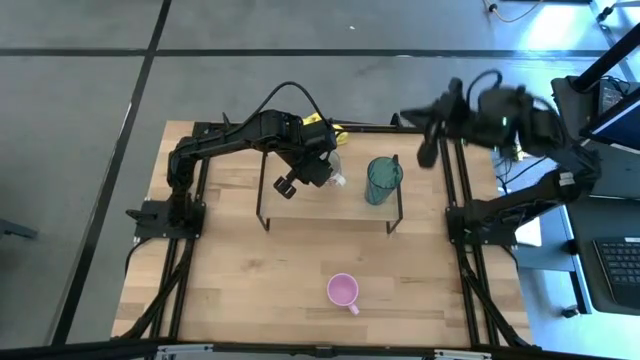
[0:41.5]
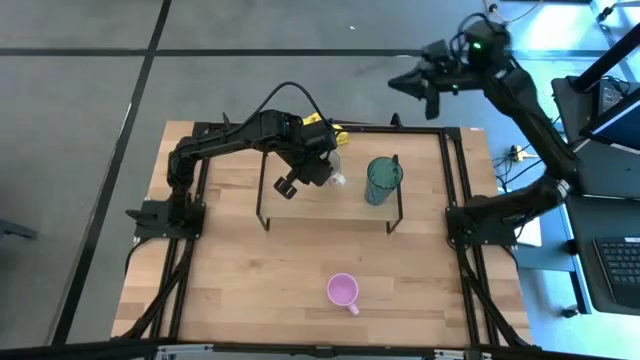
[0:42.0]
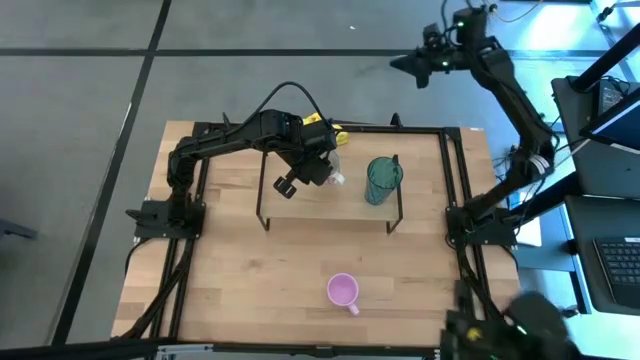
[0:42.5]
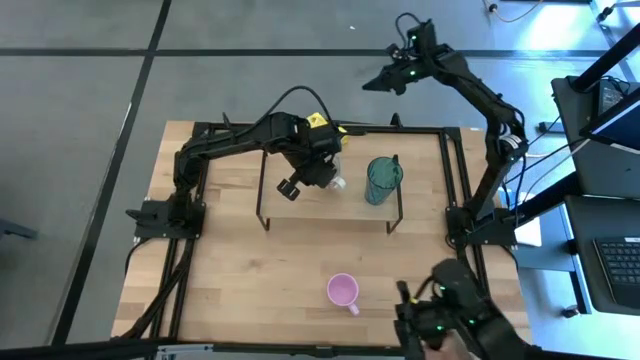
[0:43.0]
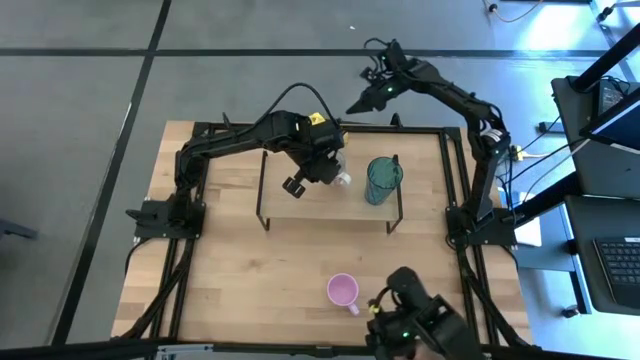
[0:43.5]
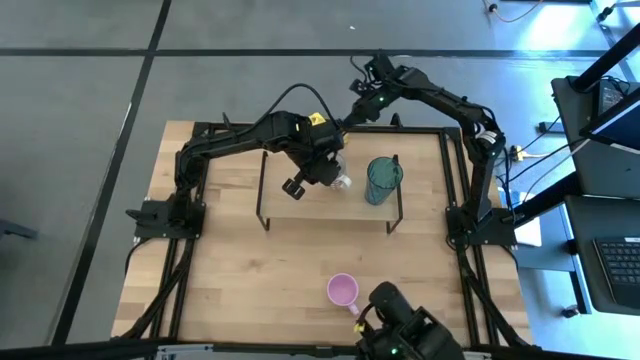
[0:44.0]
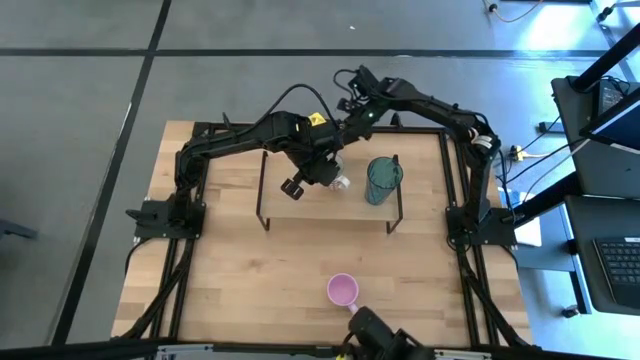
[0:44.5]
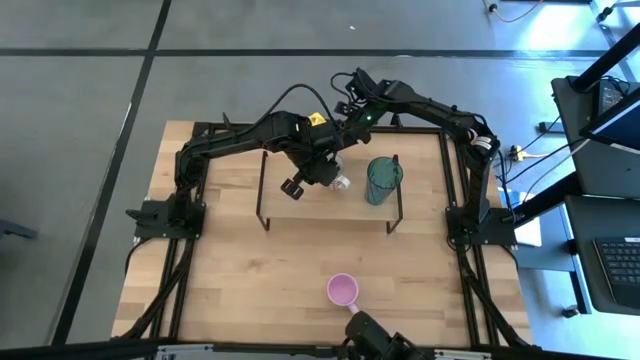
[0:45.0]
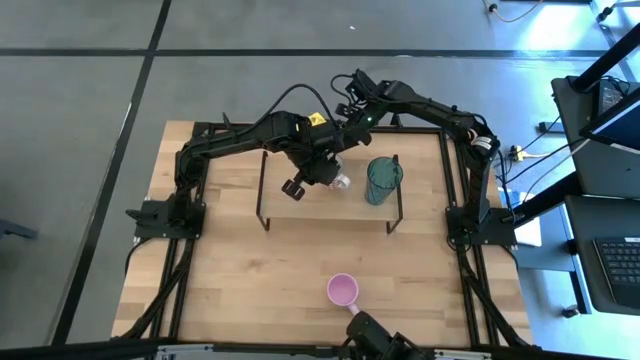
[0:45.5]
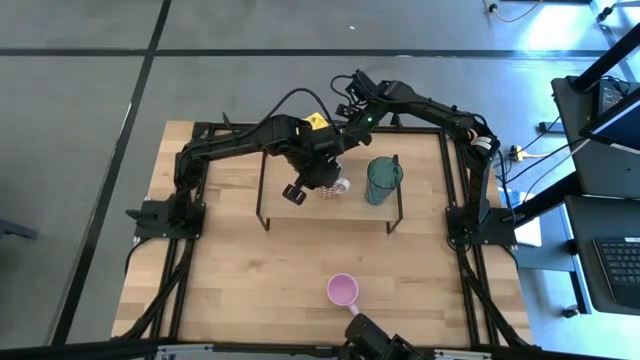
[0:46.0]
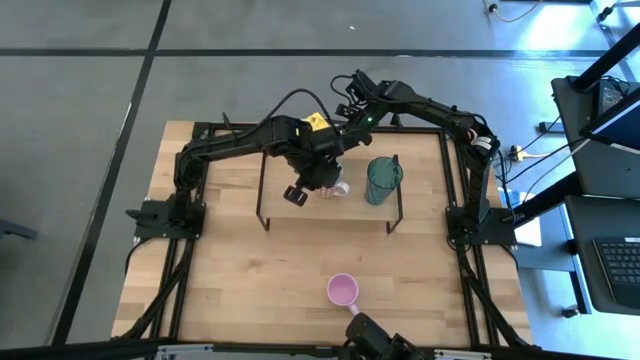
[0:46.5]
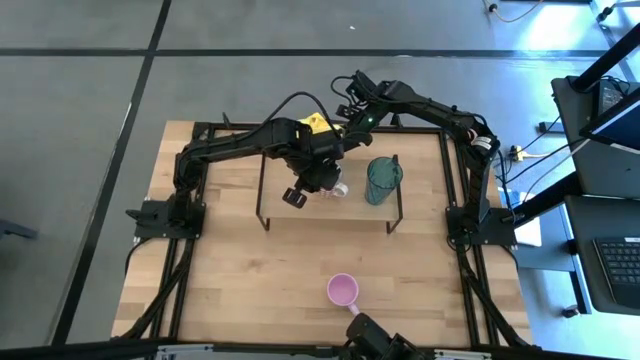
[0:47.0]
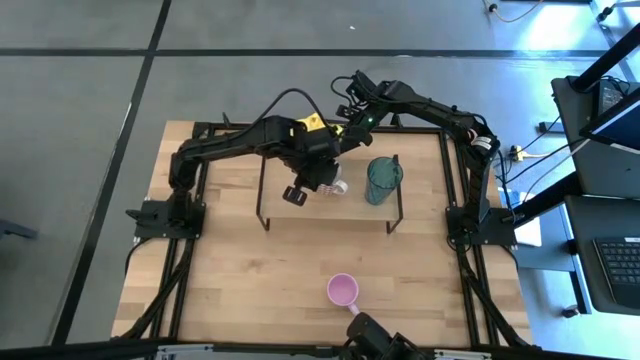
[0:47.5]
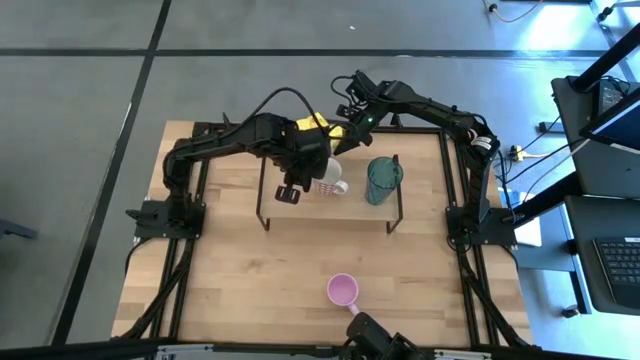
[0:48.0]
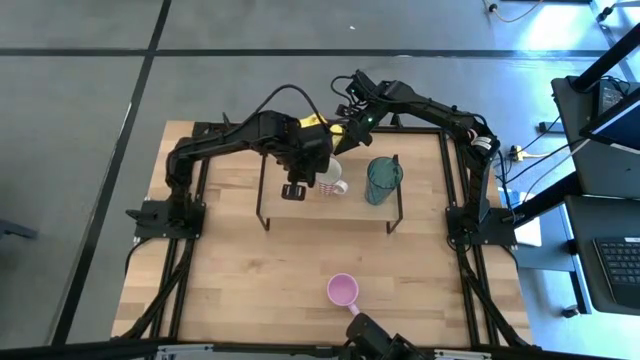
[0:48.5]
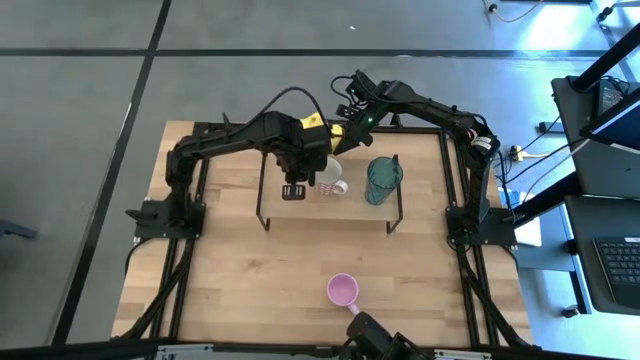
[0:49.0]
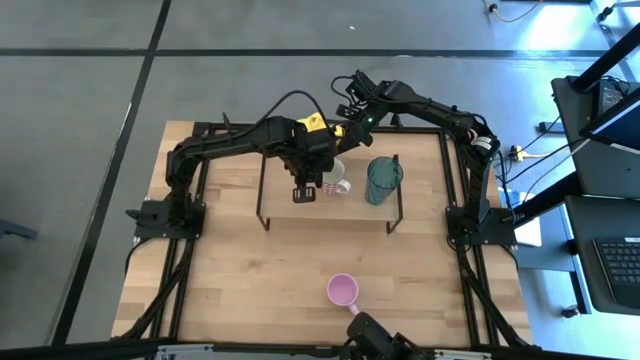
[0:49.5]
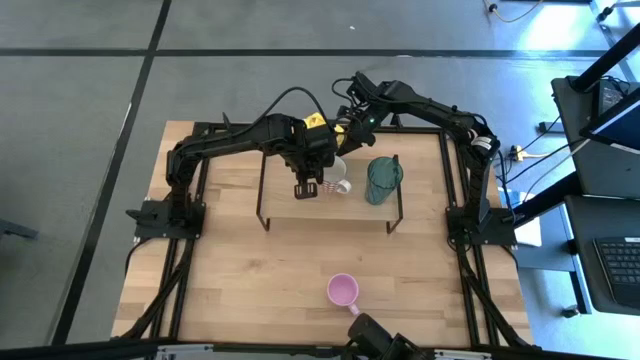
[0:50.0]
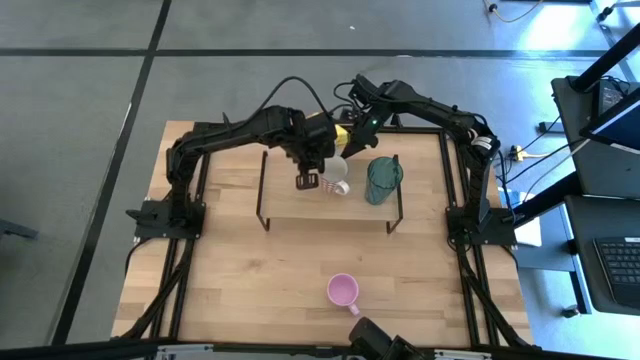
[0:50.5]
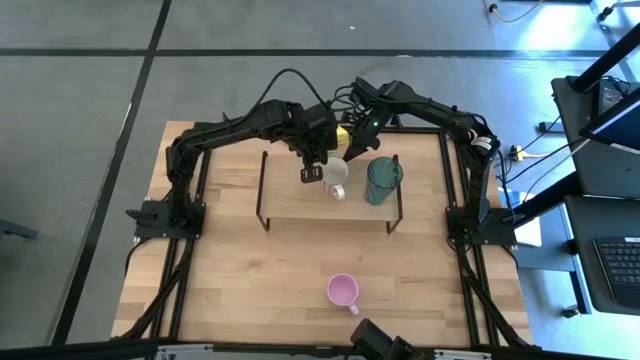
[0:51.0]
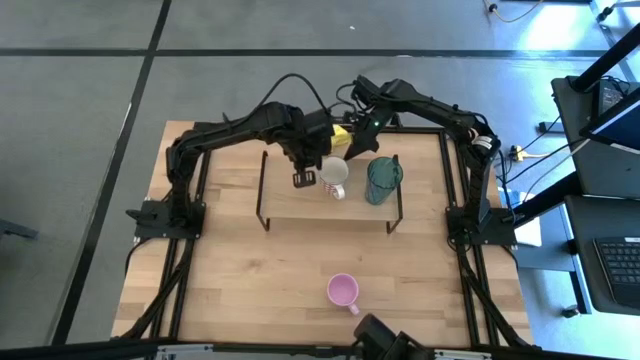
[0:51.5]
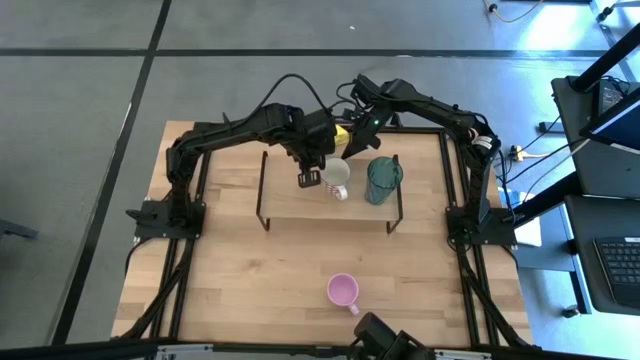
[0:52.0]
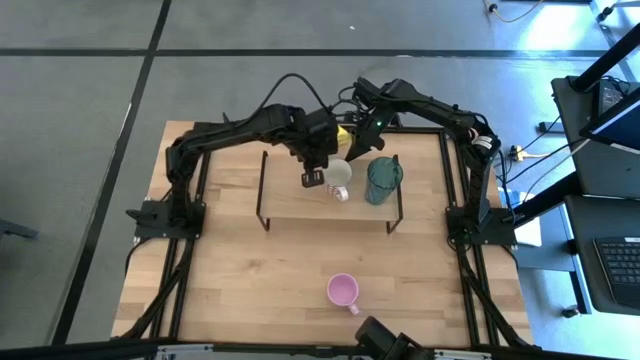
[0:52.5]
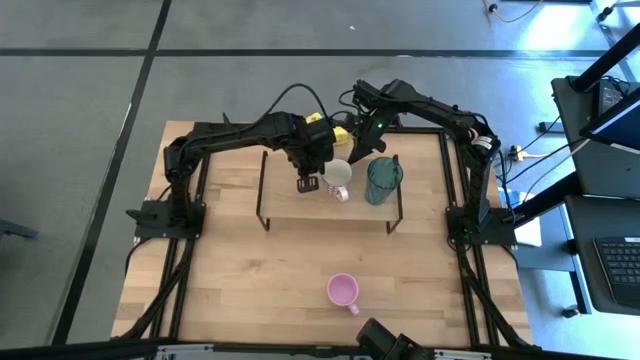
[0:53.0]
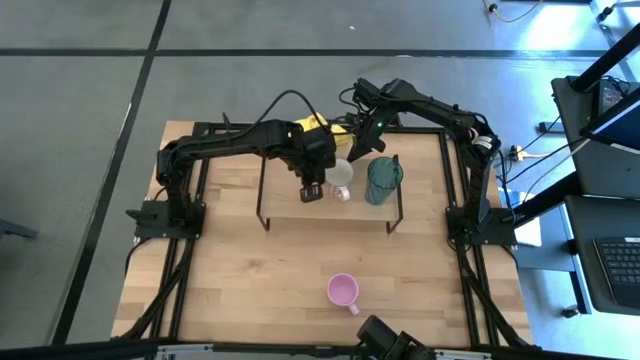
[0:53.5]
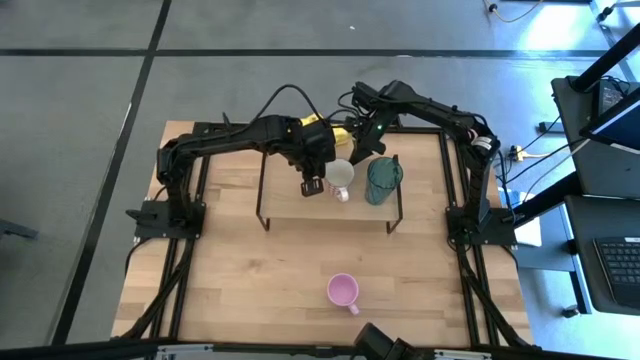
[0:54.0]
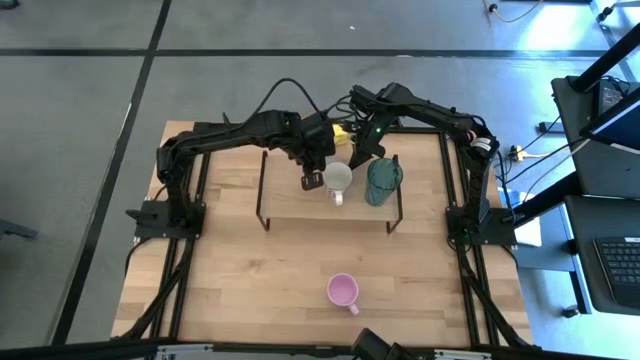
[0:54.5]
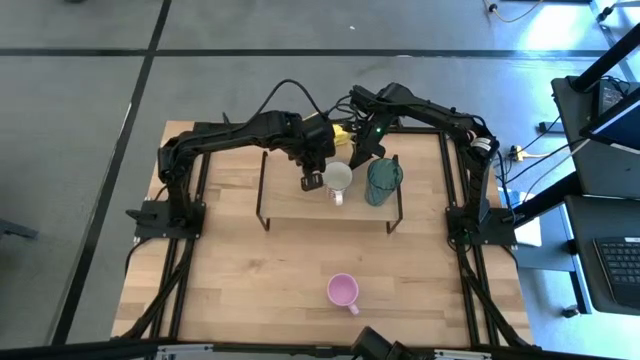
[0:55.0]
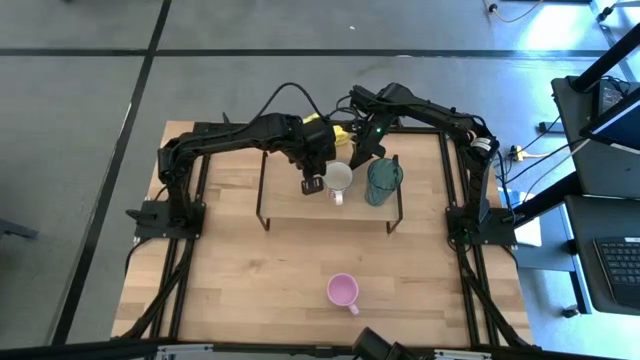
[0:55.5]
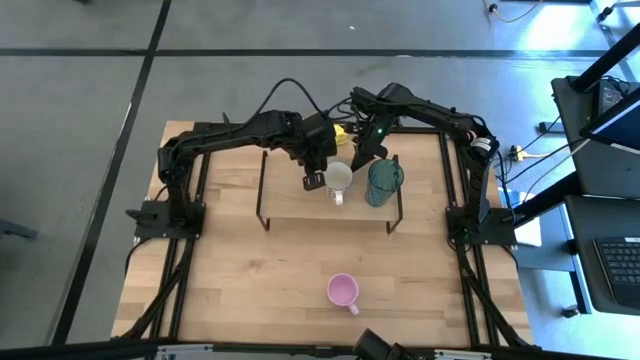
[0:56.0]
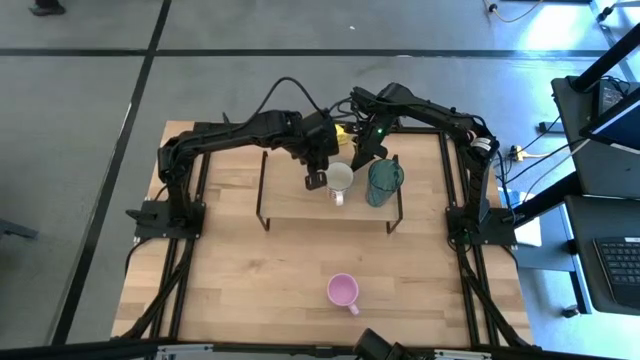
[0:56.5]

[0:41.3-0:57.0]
Task: Stack small to large cups/mugs on shelf
Put the red mug on the shelf

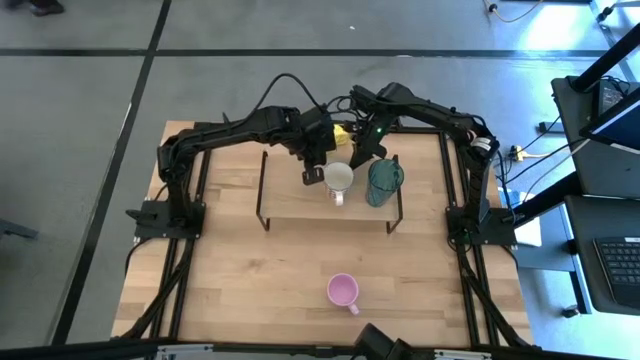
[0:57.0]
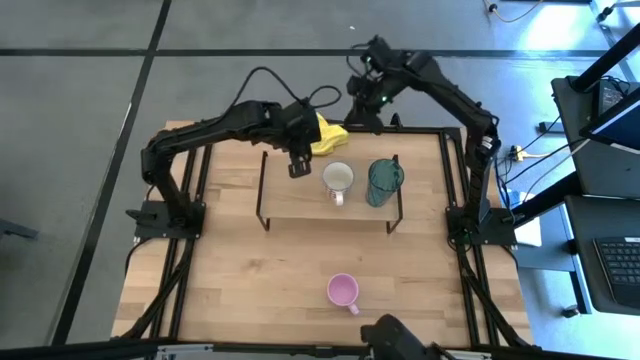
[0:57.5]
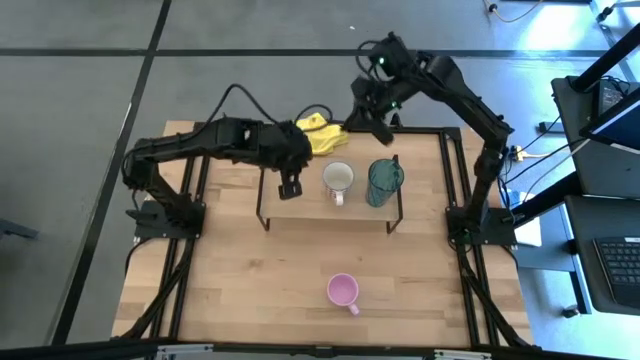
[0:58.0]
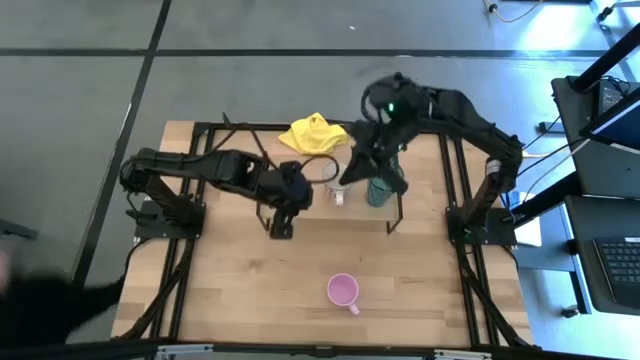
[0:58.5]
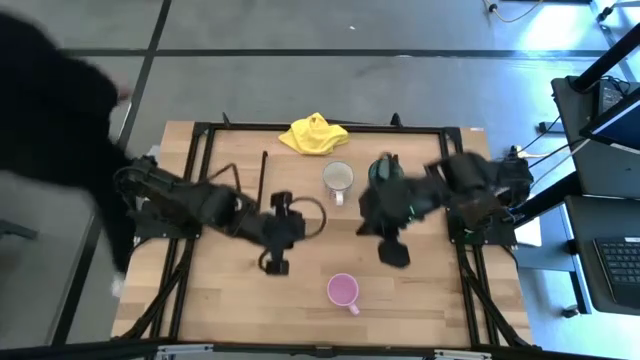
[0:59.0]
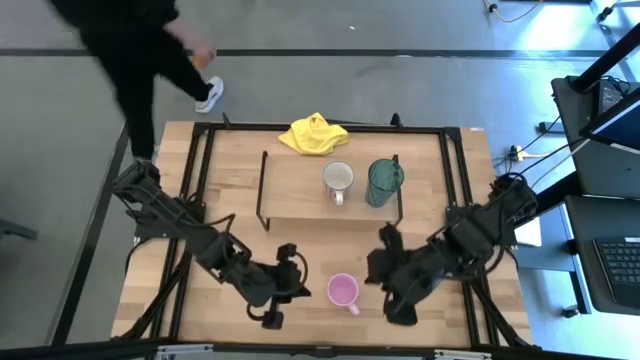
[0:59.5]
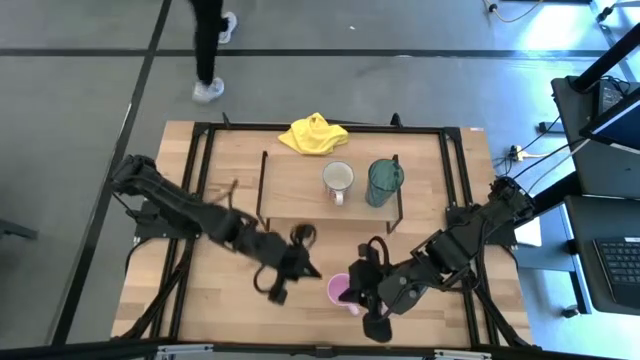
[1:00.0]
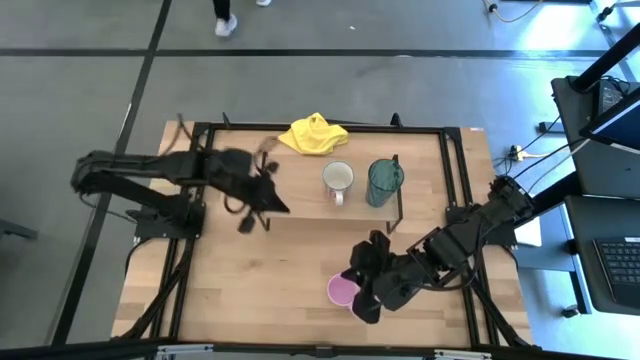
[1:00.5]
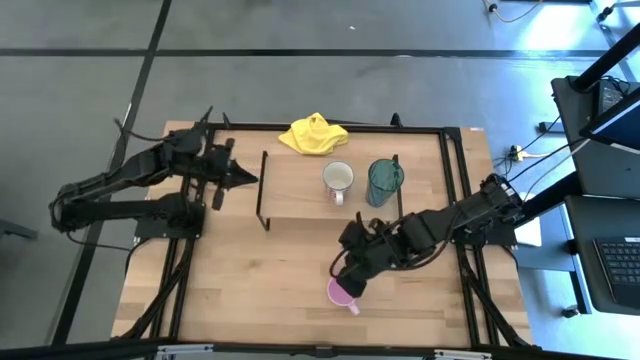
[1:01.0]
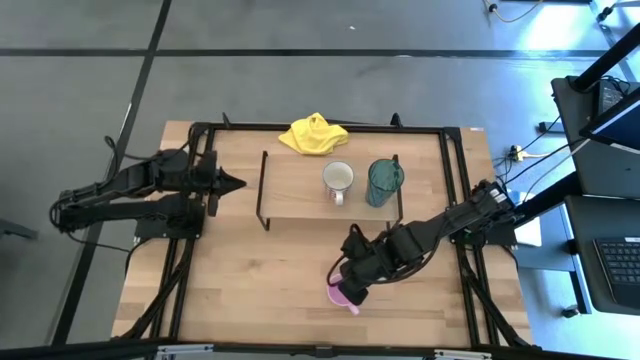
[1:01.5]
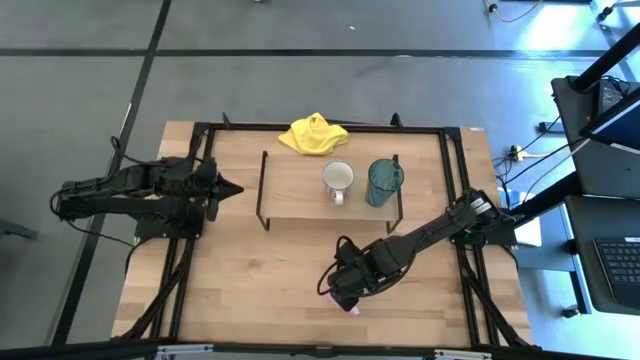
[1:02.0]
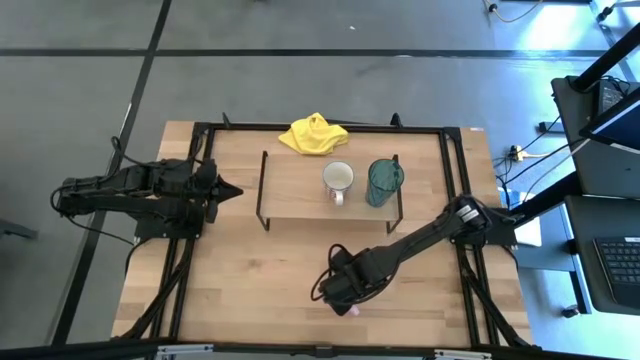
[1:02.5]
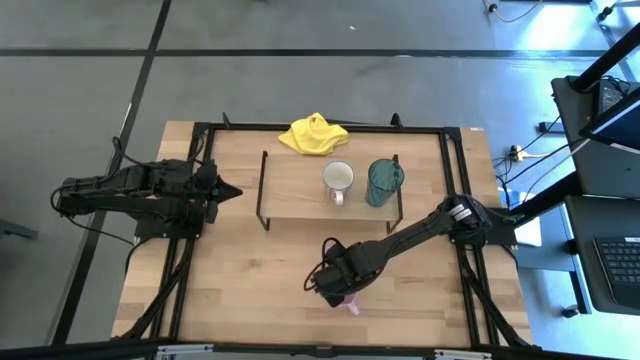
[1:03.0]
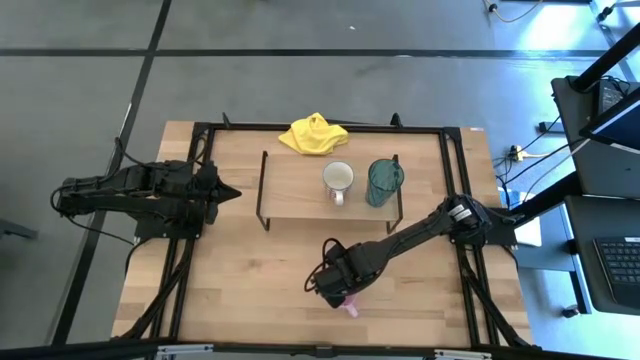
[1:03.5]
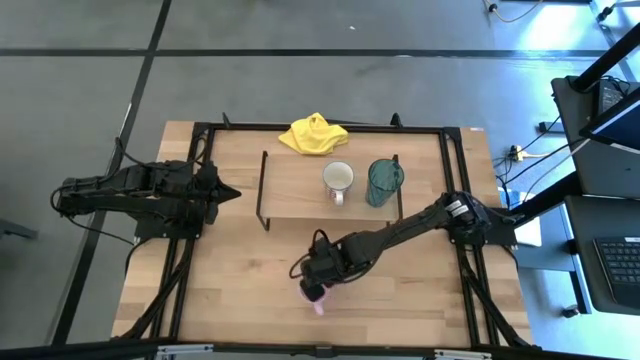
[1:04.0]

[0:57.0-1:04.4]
Put the pink mug on the shelf
